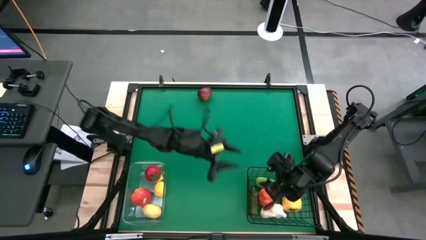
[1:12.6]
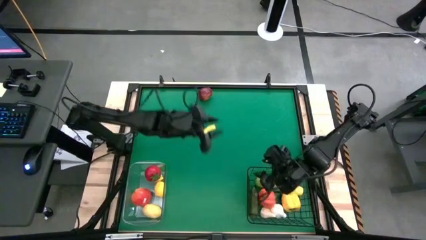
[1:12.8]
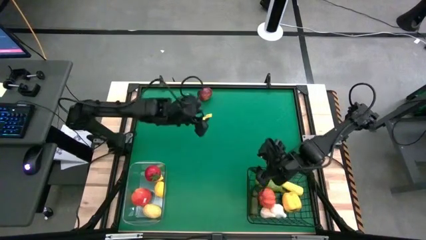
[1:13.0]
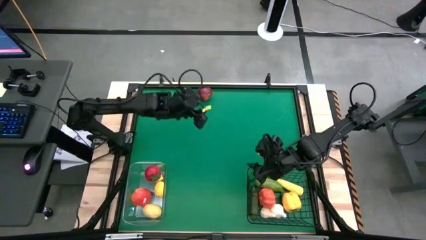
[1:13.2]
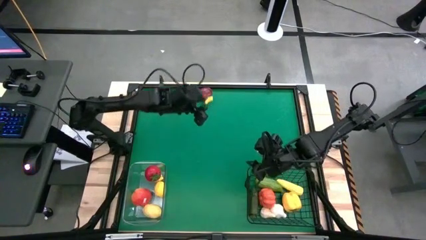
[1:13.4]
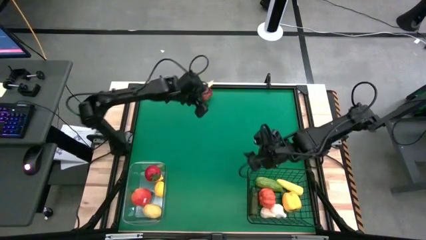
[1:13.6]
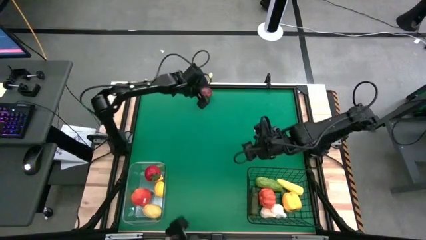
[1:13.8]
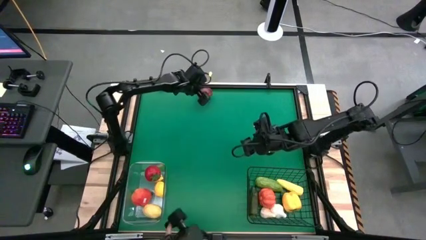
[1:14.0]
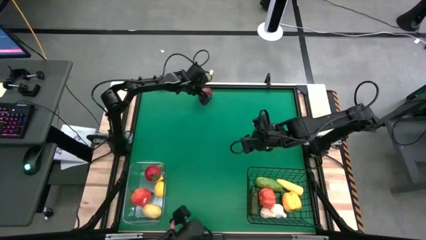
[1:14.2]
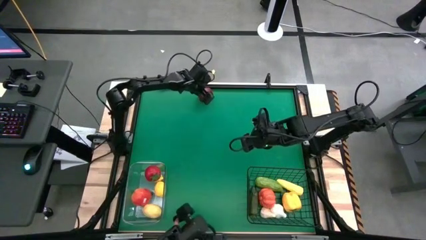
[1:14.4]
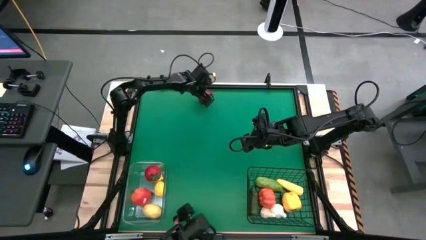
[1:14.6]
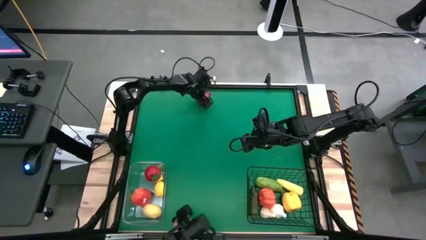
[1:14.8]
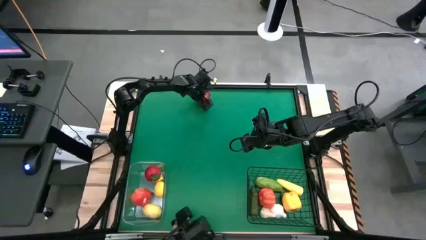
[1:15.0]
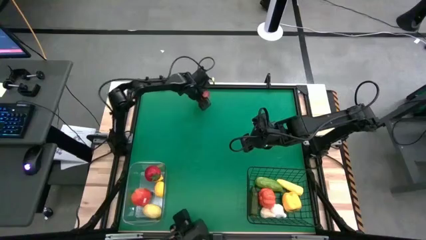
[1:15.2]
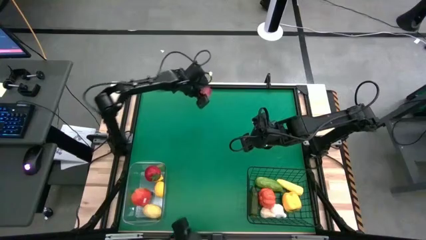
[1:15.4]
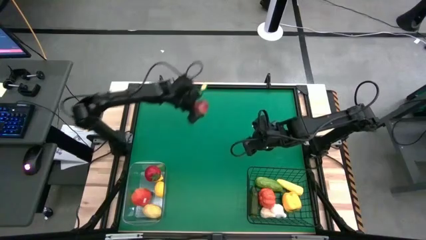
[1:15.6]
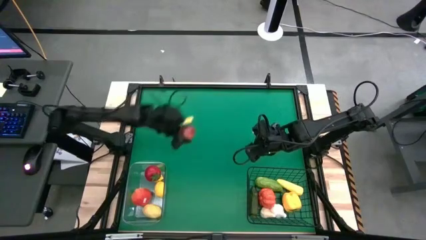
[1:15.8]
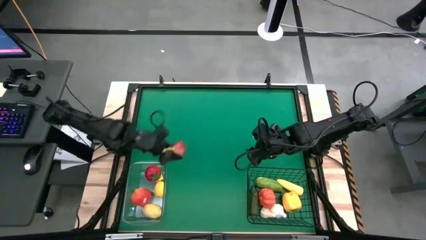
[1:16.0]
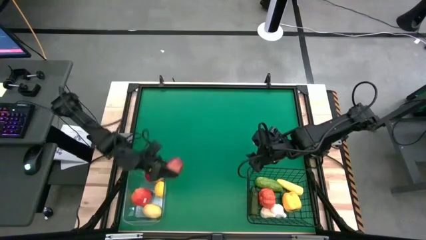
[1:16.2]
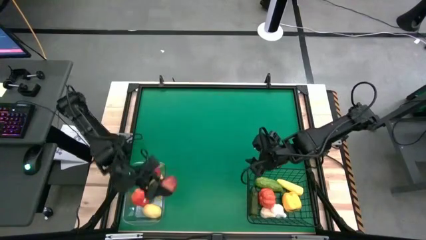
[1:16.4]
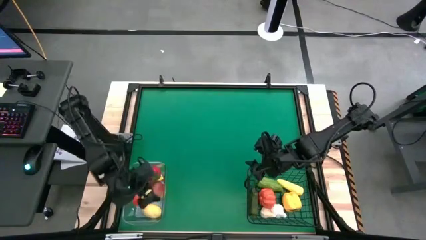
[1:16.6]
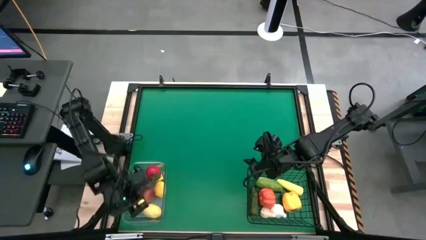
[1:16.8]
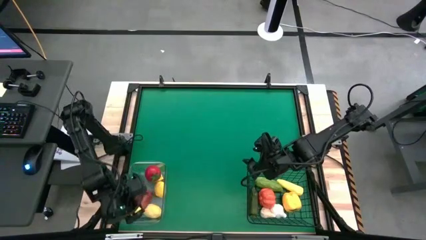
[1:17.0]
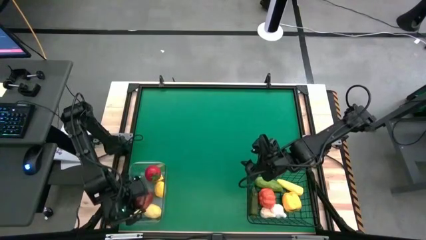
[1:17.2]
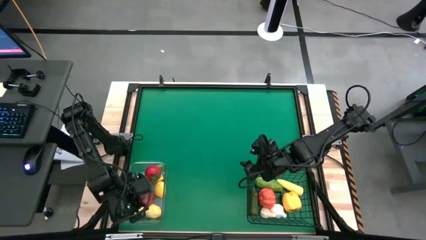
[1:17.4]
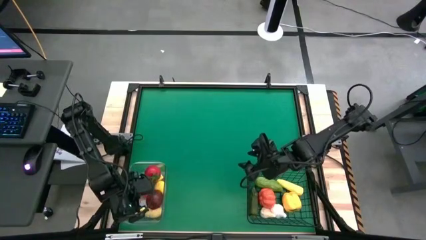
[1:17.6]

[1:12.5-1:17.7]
Task: Sort produce into baskets
Put the apple into the transparent bin

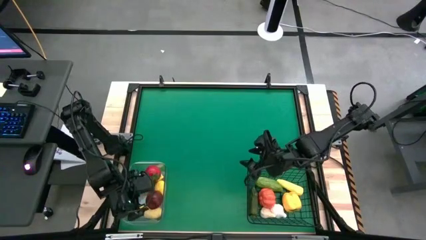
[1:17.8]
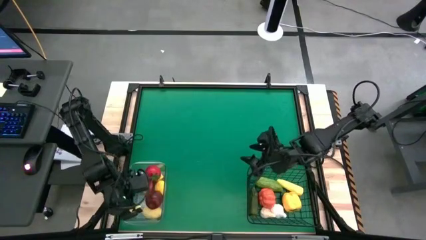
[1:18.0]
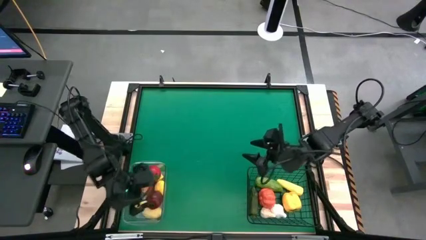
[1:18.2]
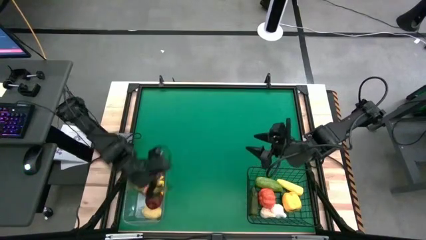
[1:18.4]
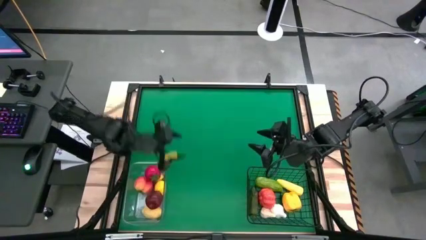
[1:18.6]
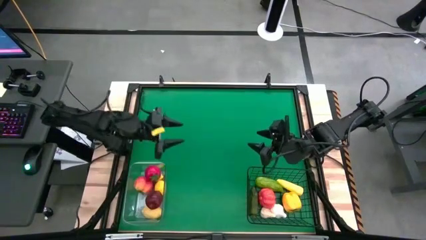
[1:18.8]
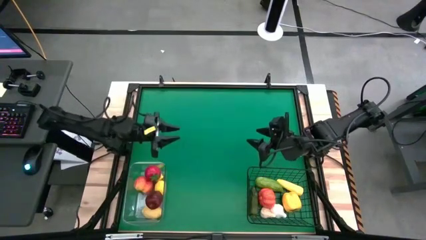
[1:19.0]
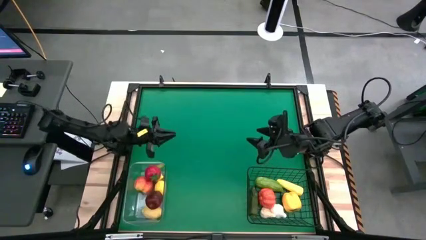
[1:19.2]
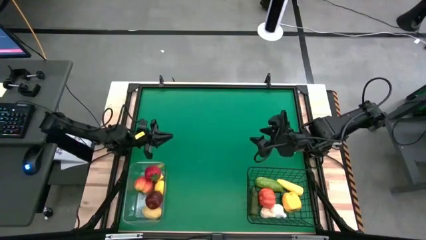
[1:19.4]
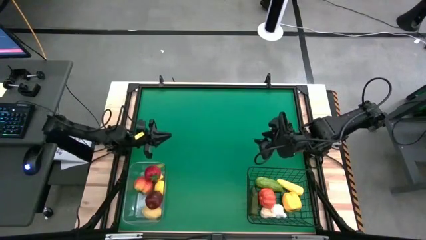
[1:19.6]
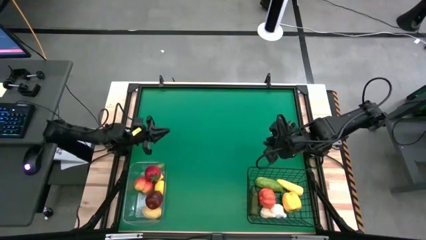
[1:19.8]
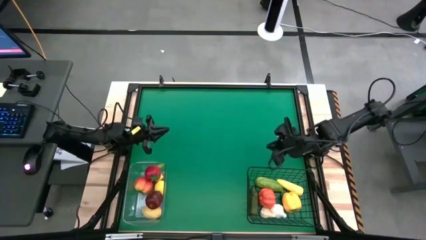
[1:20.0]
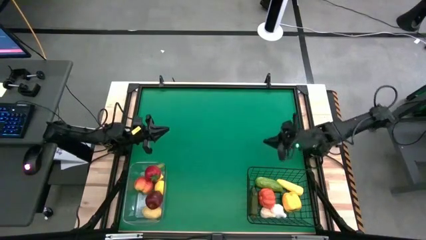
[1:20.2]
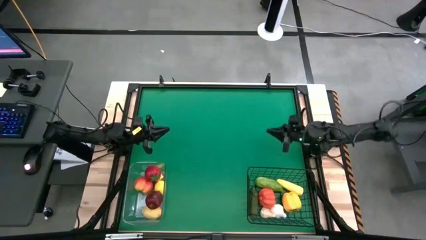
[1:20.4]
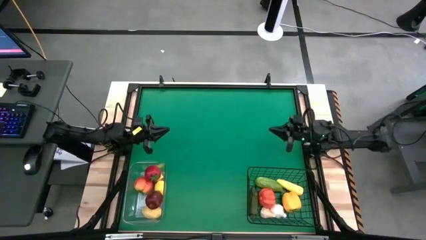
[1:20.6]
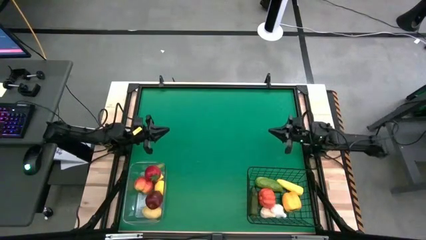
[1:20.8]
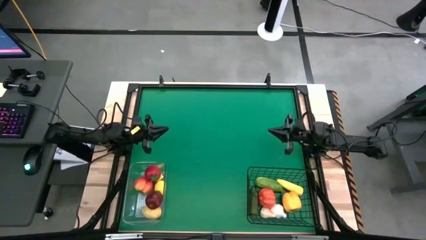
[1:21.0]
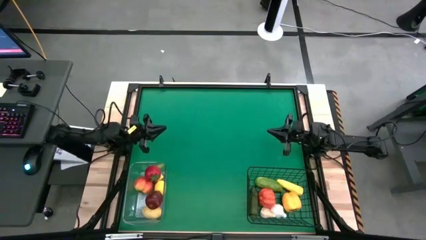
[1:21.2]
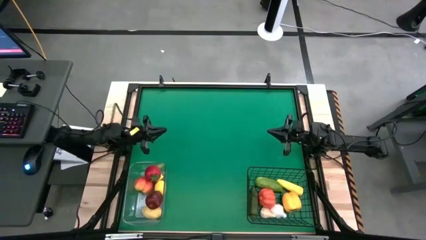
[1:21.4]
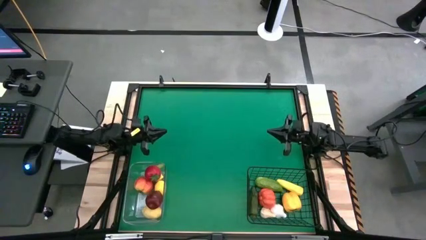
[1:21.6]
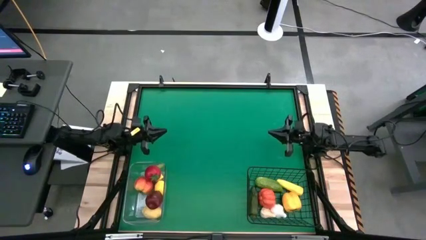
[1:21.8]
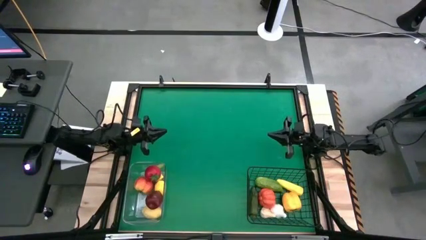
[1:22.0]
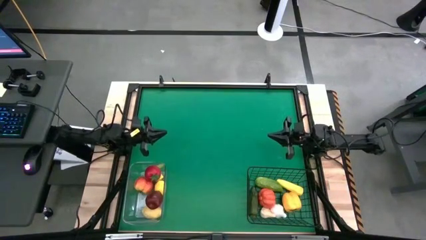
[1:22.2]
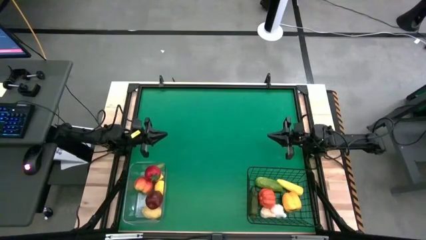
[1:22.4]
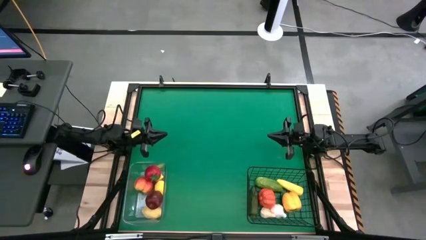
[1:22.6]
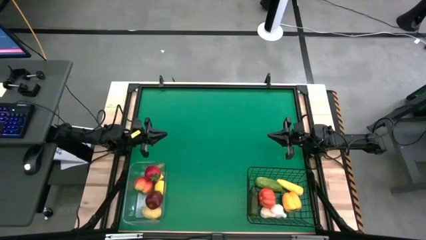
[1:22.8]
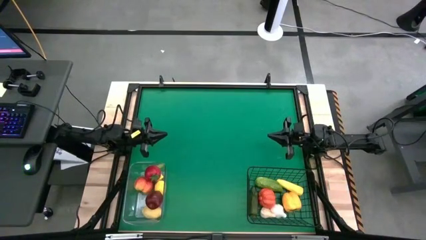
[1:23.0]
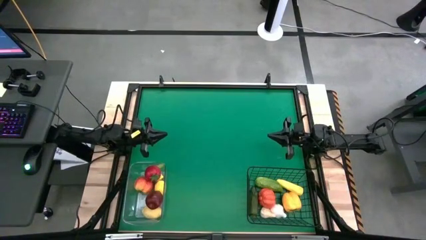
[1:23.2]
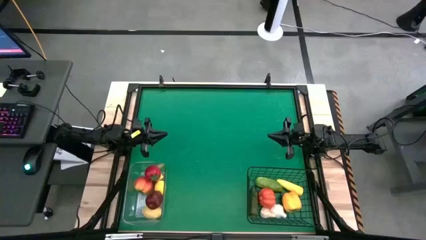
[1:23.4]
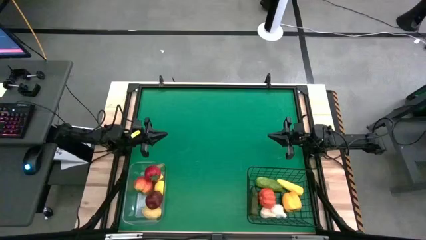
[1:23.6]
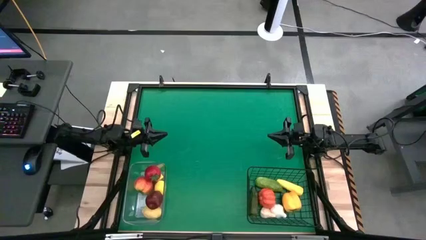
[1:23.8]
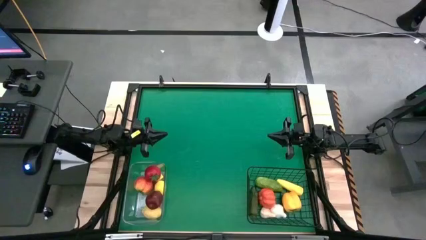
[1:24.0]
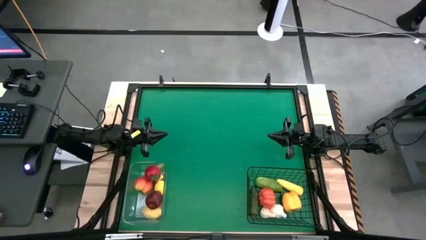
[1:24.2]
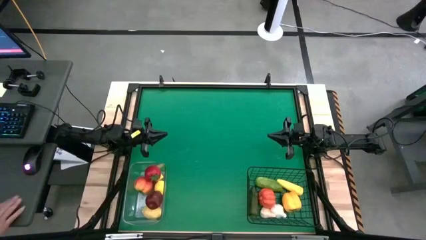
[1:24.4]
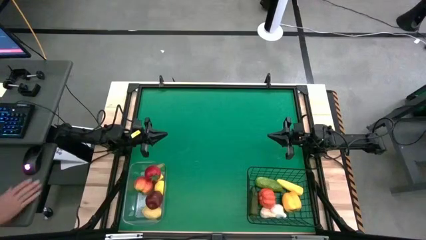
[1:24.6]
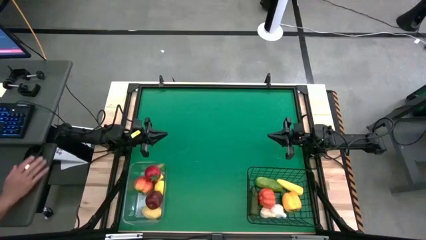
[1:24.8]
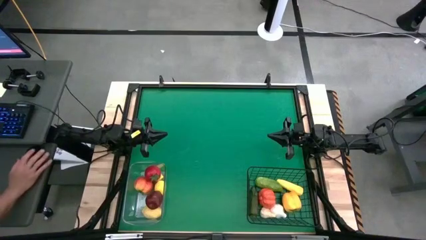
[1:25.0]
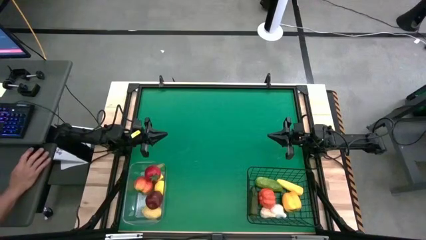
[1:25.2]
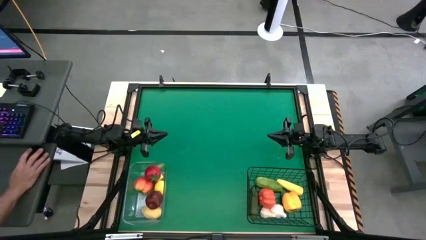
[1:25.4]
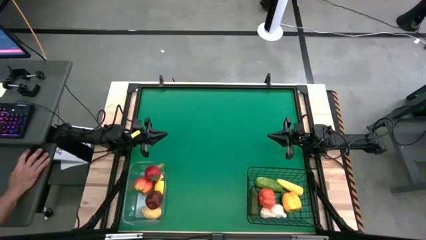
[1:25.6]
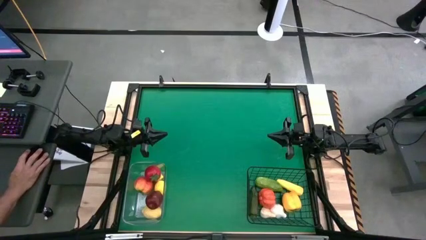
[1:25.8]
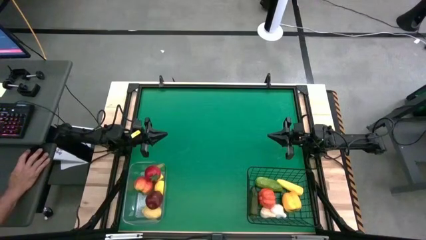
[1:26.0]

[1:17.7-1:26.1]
Return to Home Position
